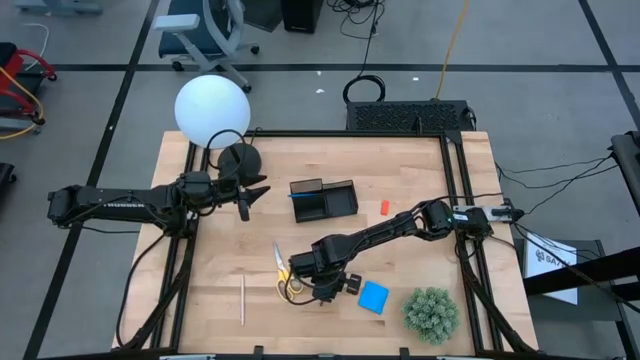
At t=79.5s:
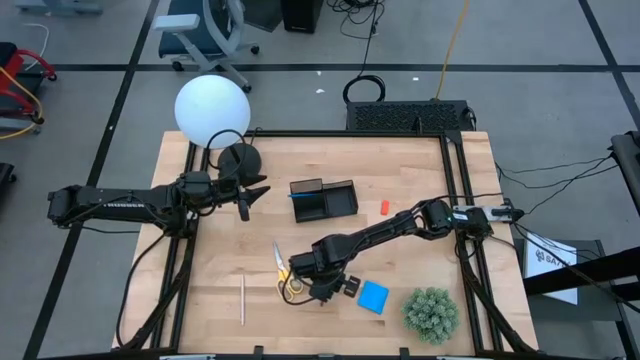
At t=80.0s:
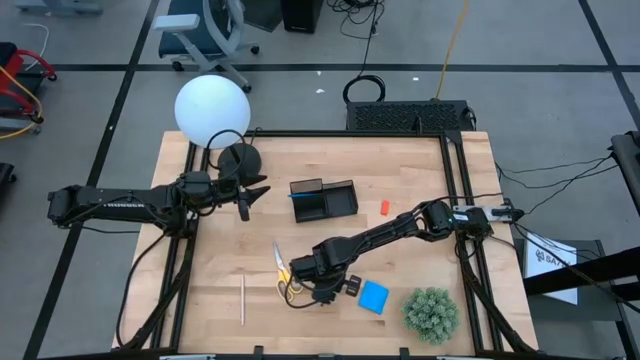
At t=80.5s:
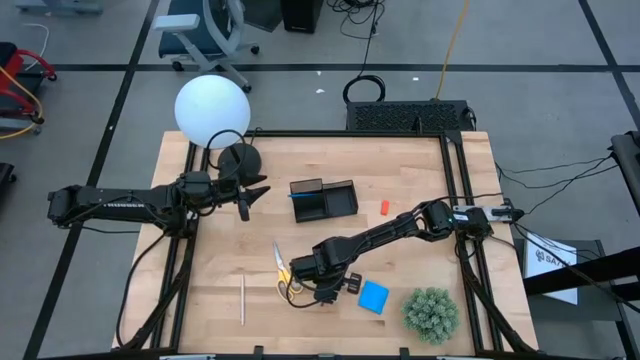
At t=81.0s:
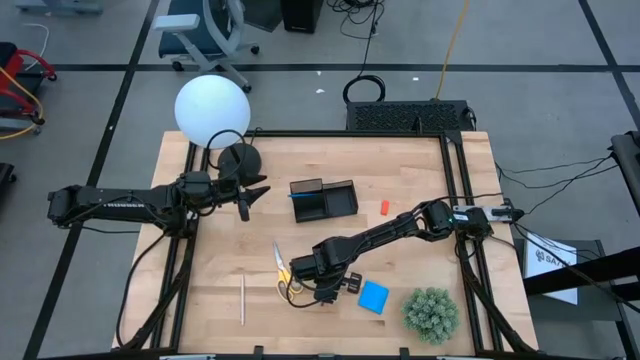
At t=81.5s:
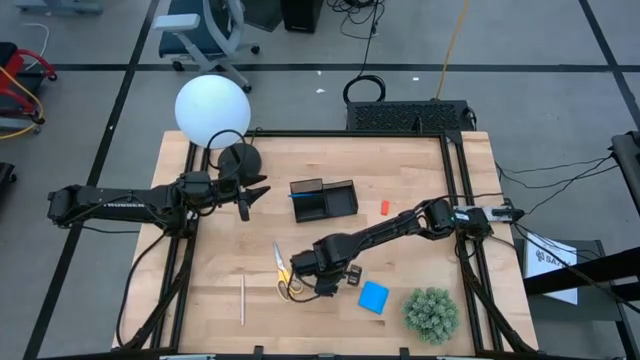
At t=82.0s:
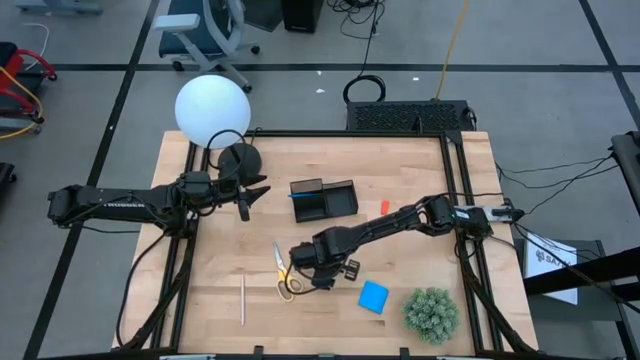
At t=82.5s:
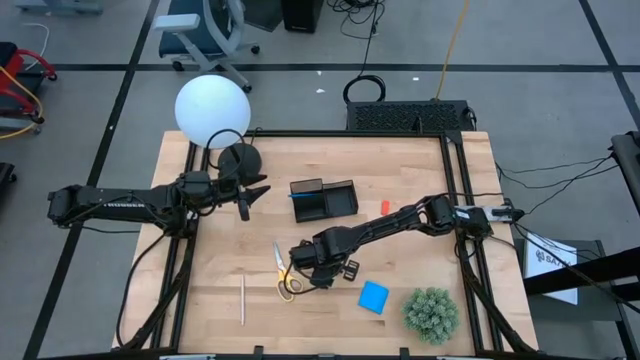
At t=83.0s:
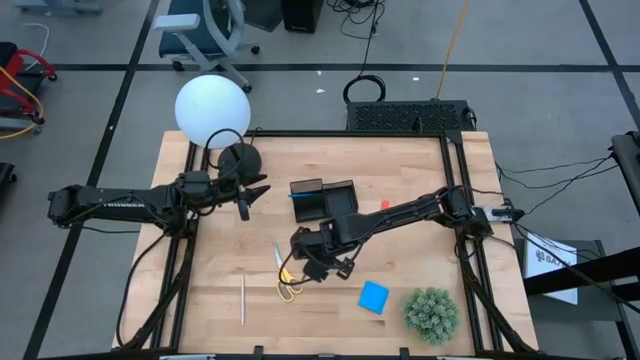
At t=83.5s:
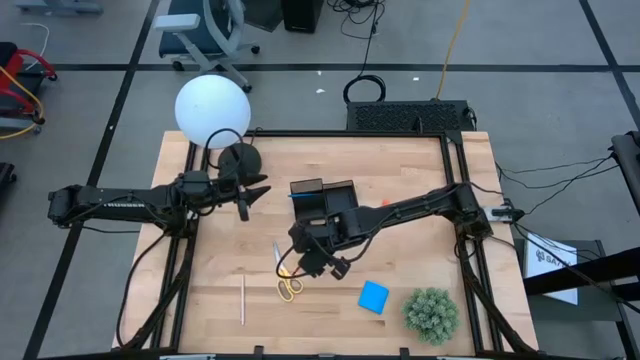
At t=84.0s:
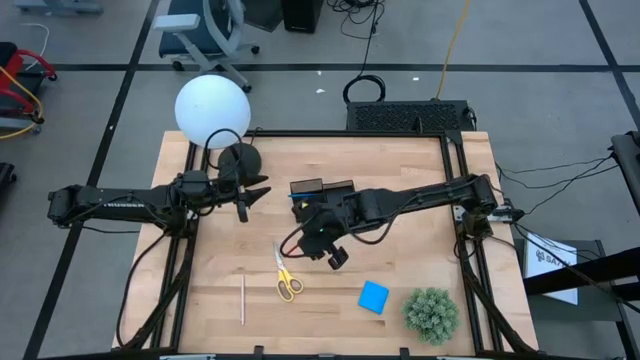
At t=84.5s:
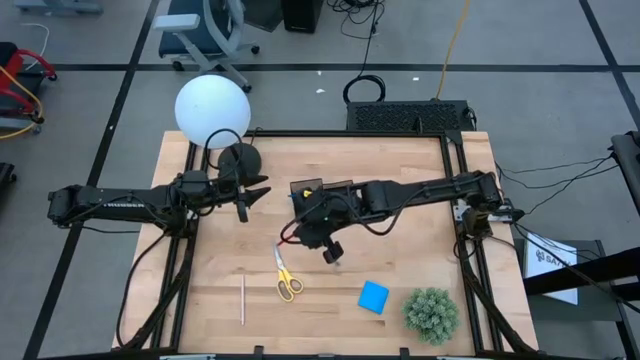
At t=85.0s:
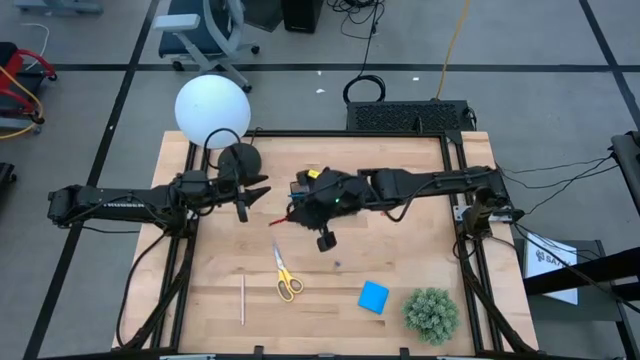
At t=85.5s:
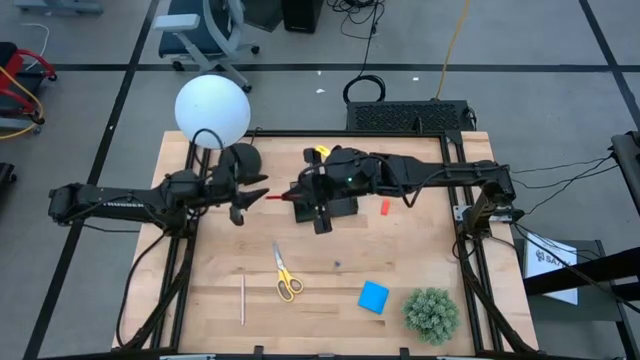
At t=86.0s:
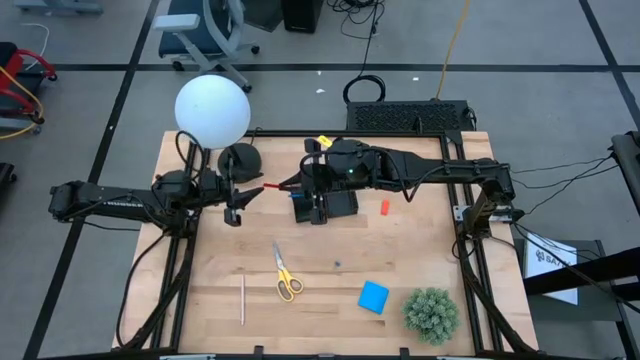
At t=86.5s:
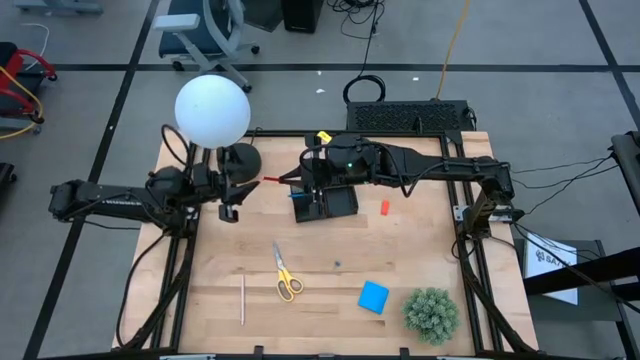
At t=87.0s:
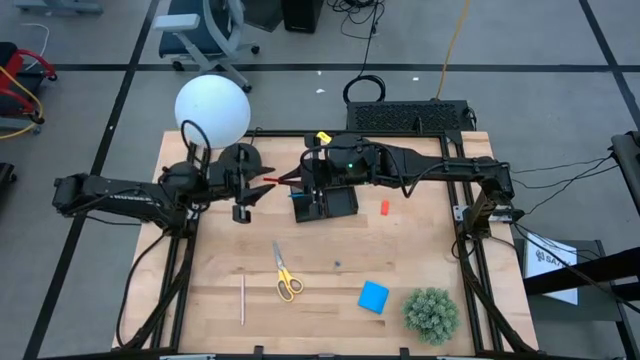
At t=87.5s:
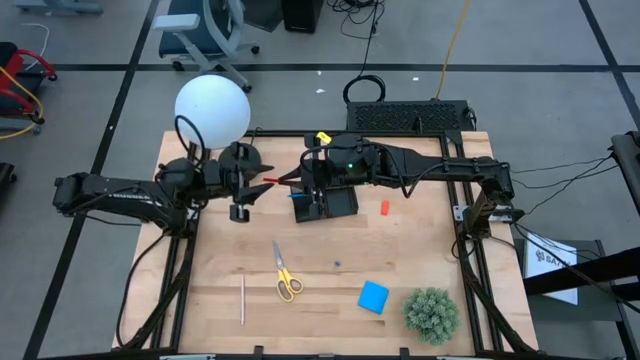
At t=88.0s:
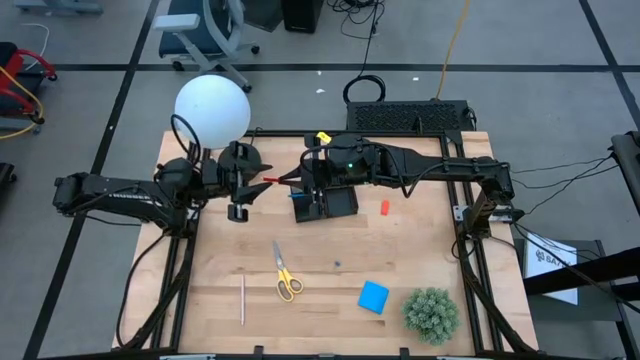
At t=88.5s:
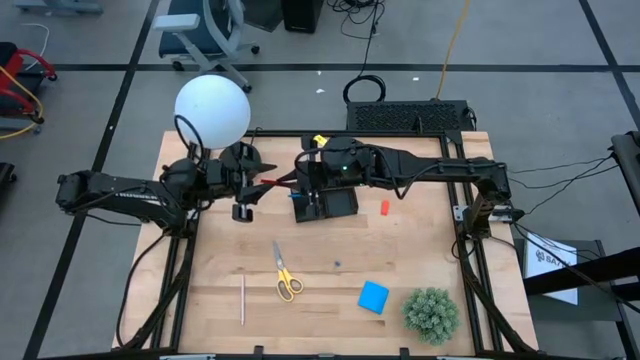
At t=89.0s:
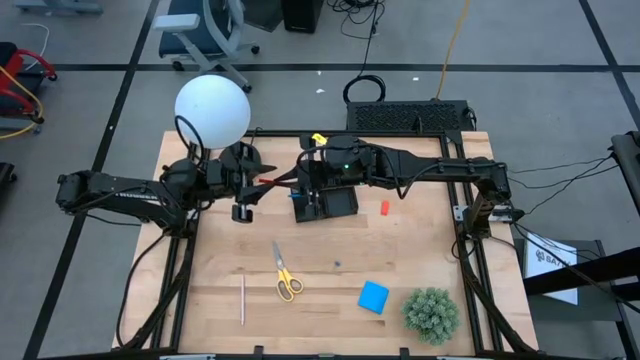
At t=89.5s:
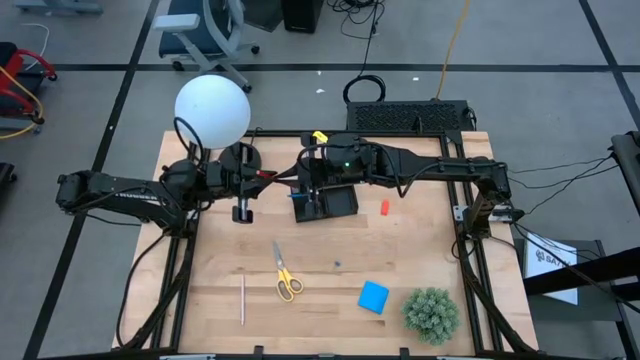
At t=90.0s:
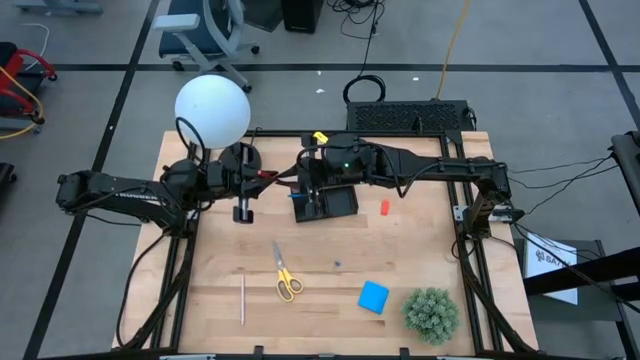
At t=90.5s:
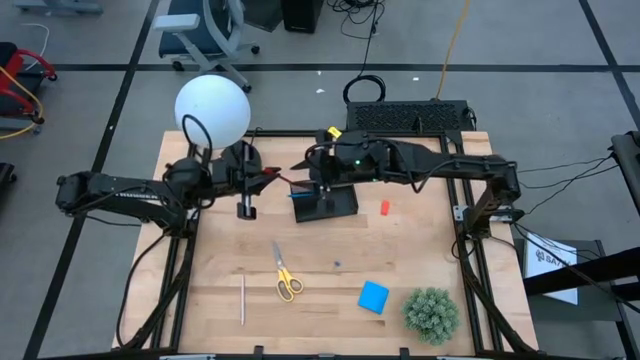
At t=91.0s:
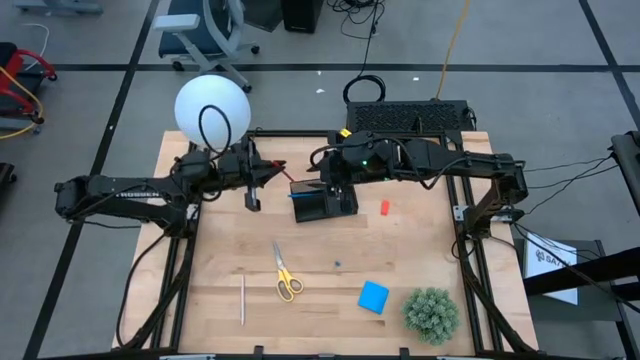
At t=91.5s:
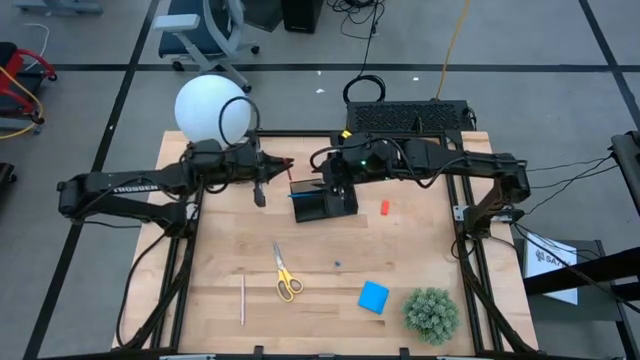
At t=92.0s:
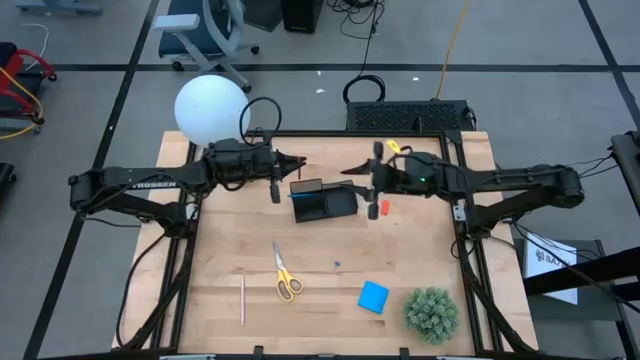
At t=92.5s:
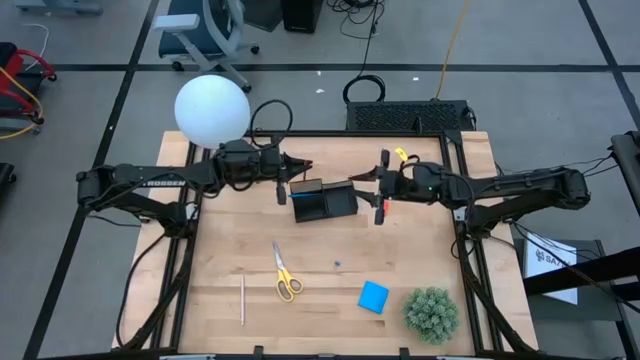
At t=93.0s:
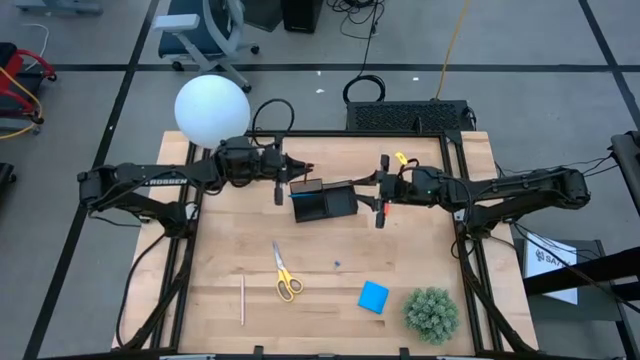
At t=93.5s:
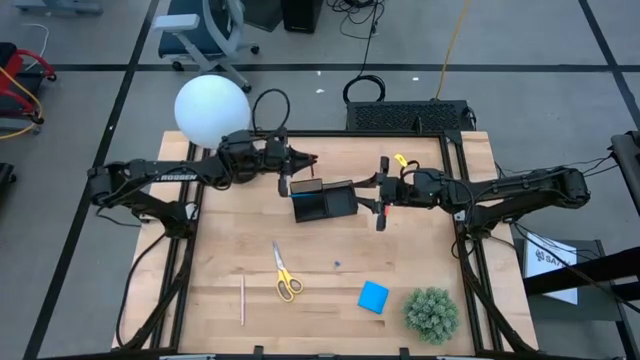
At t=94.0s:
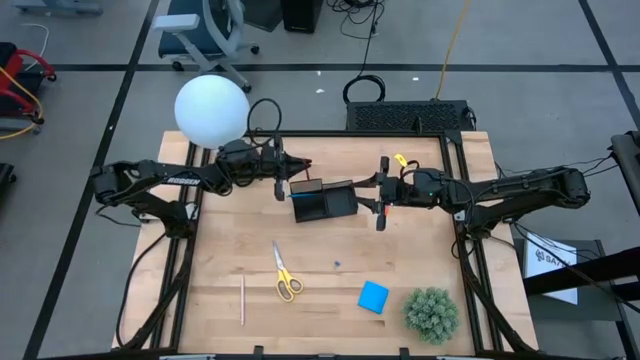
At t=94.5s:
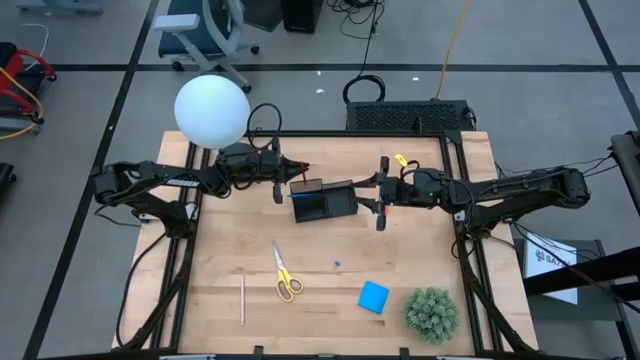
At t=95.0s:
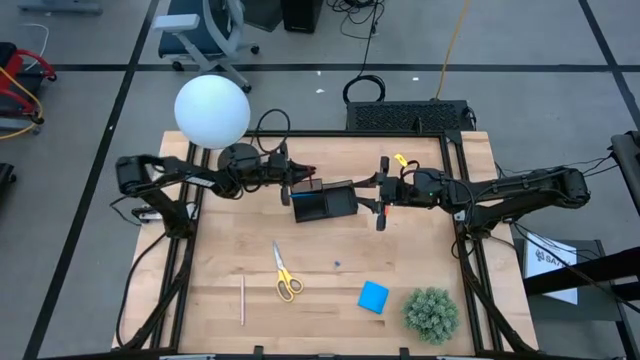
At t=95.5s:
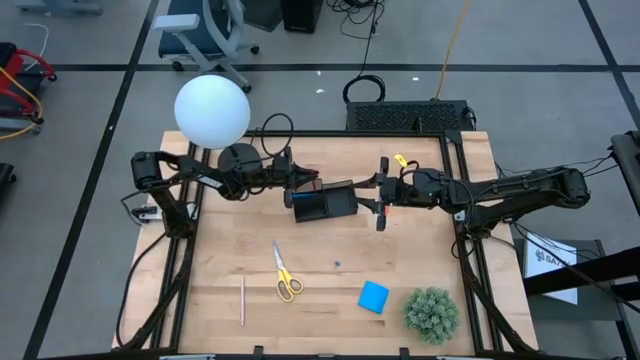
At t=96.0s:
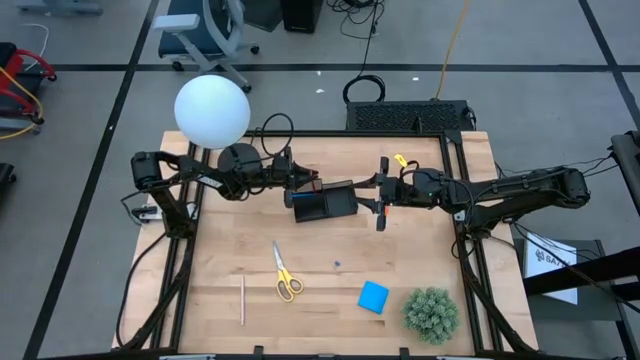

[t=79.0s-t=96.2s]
Task: Pick and place office supplies into organizer
Put the red pencil into the desk organizer

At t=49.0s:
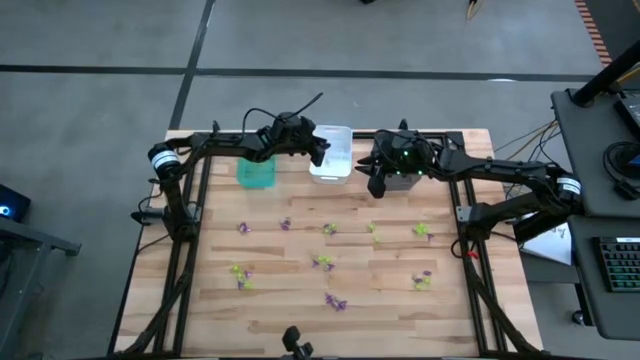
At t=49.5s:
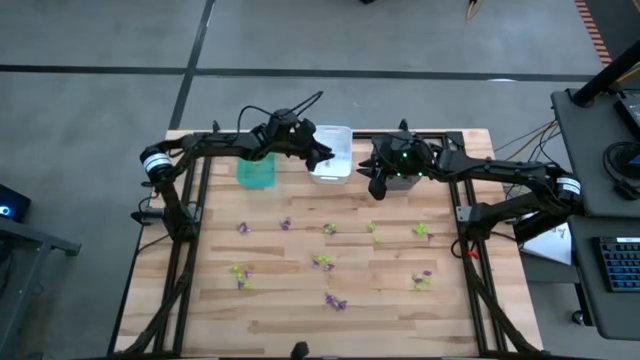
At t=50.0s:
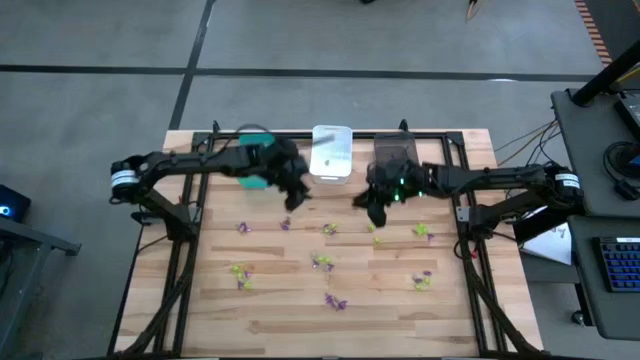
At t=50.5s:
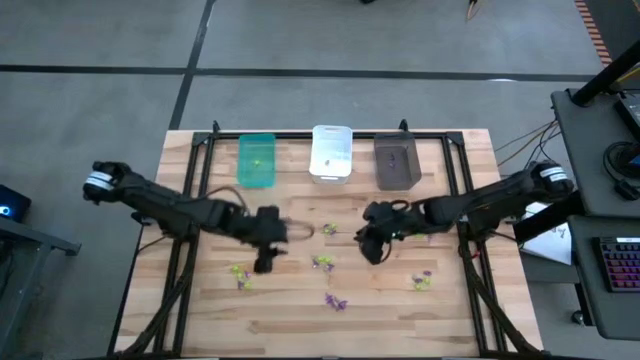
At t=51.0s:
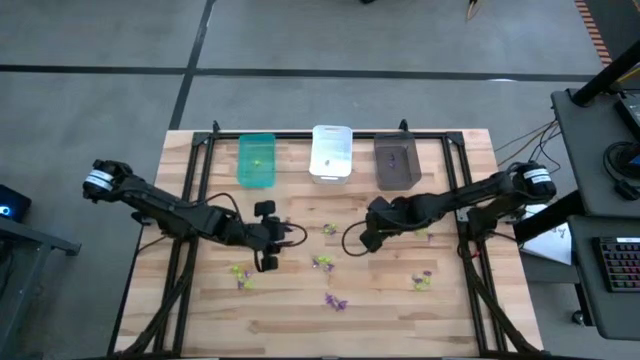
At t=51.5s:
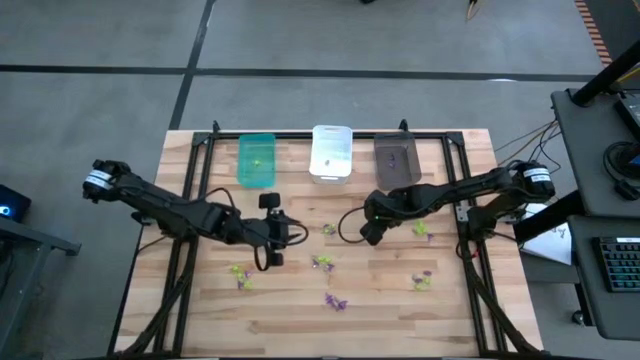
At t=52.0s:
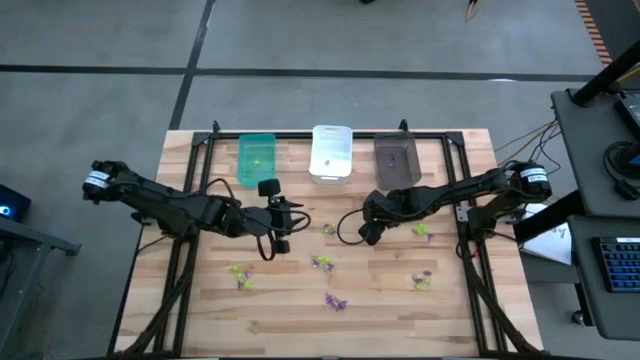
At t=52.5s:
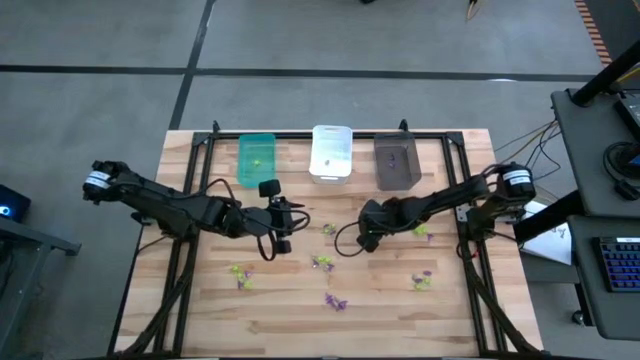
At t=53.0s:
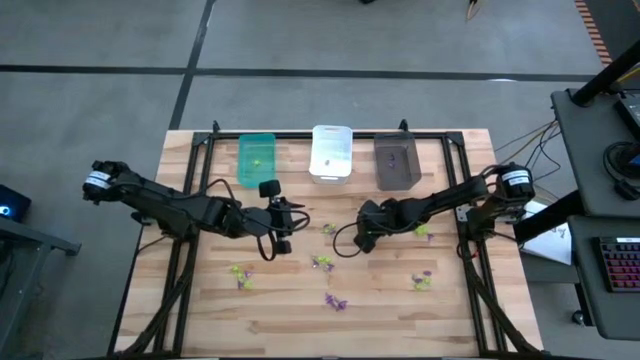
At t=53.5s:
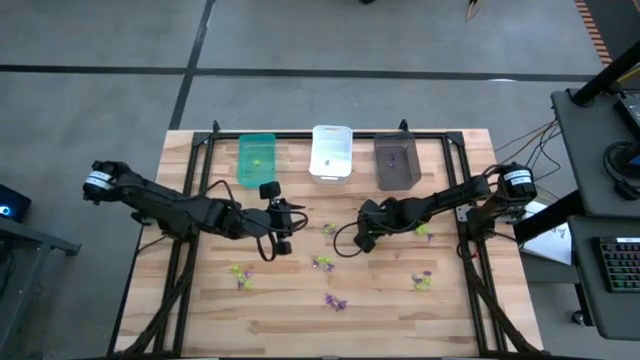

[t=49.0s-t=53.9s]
Task: Sort Halloween decoration
Put the green spider toy into the blue bin
